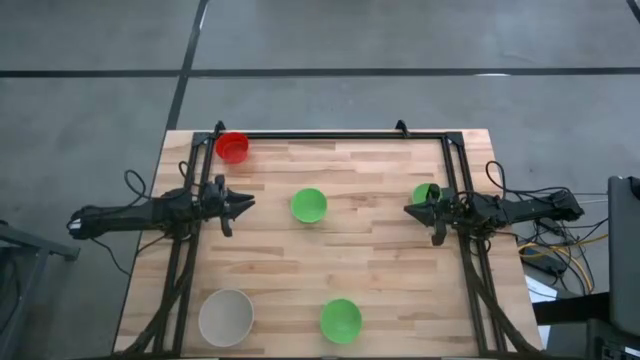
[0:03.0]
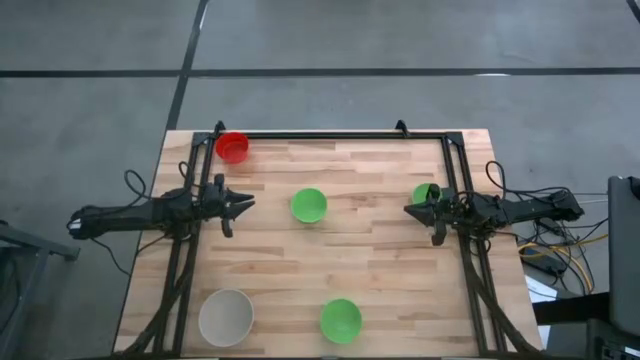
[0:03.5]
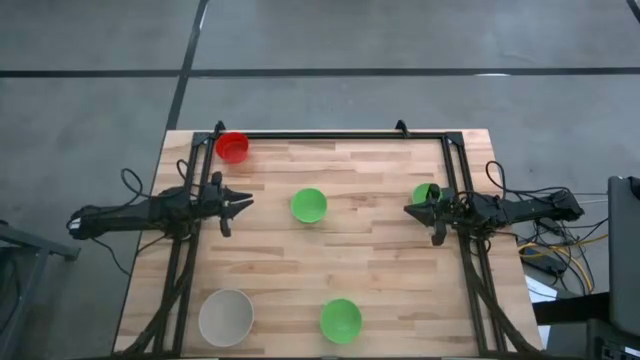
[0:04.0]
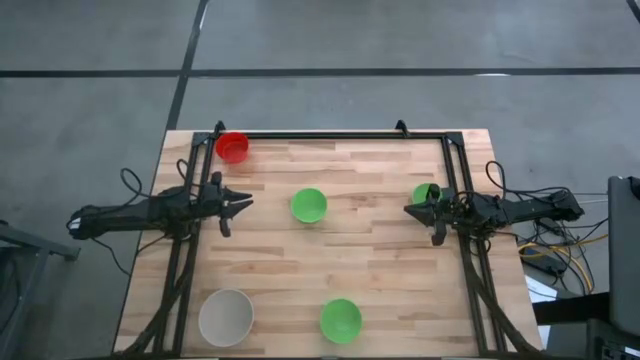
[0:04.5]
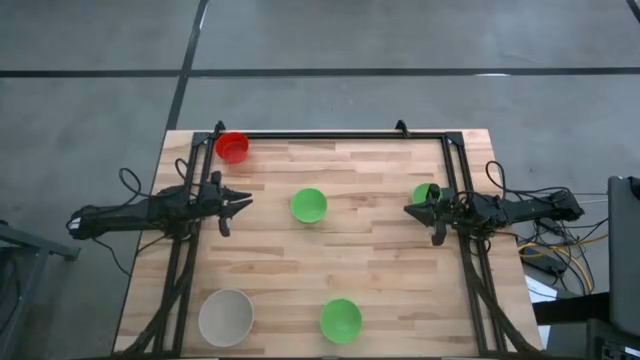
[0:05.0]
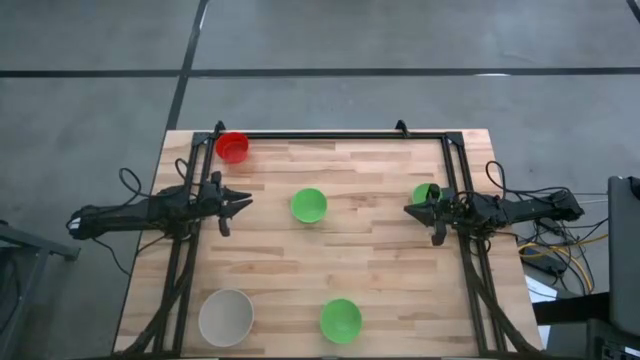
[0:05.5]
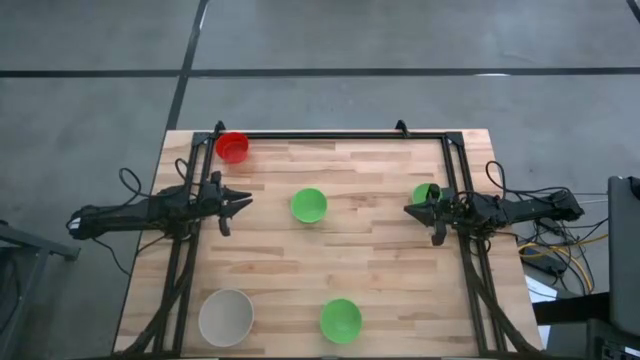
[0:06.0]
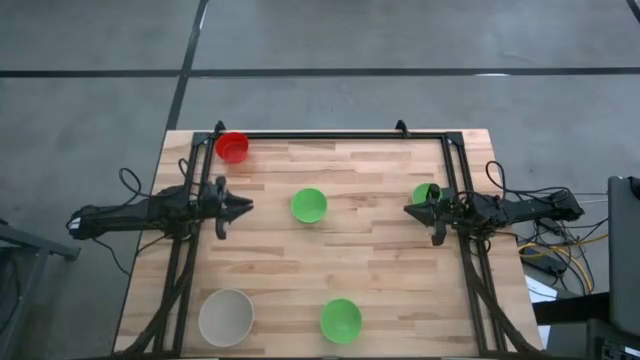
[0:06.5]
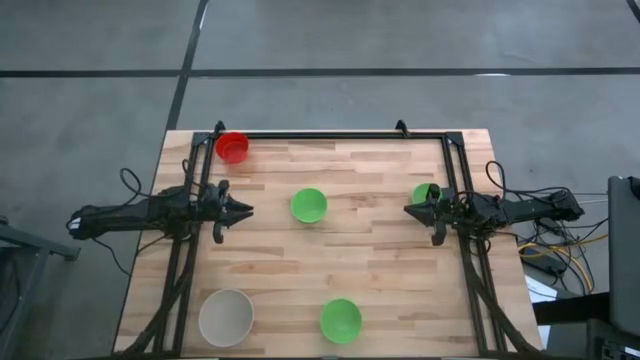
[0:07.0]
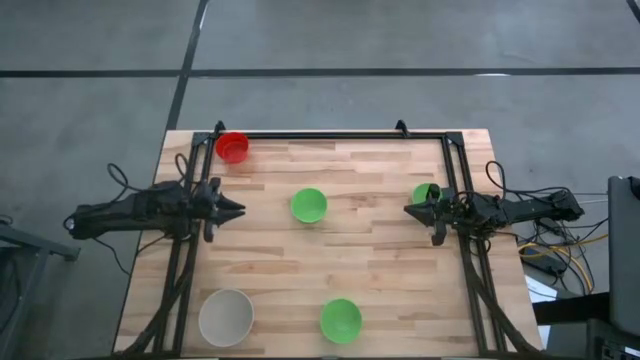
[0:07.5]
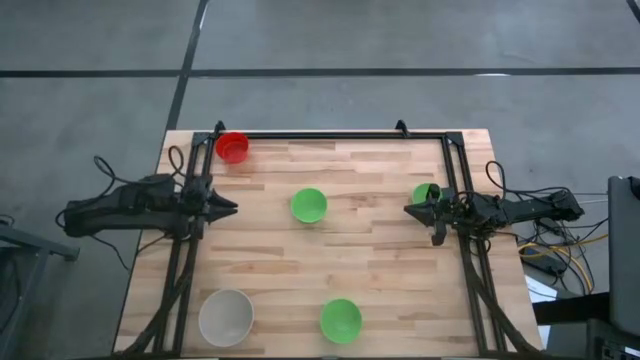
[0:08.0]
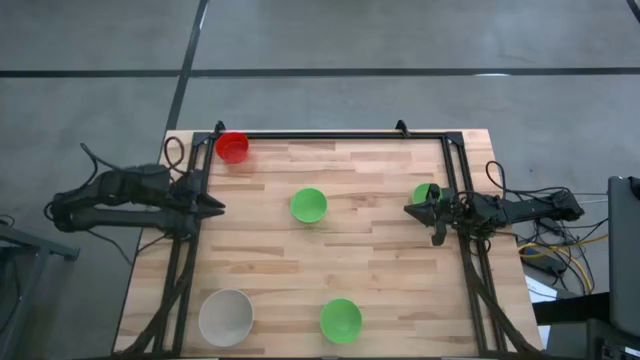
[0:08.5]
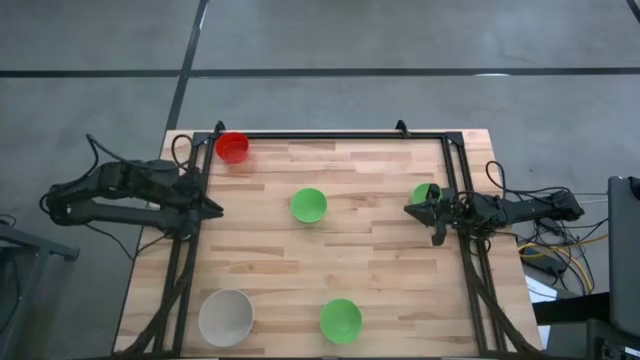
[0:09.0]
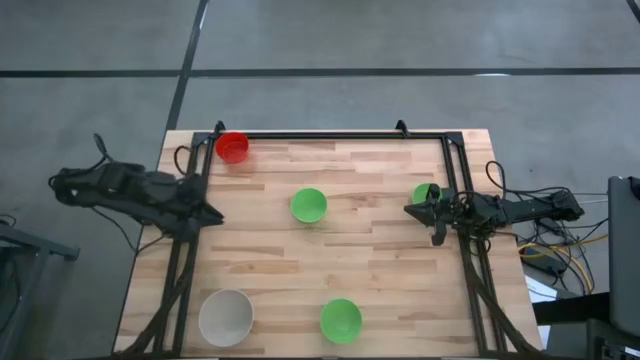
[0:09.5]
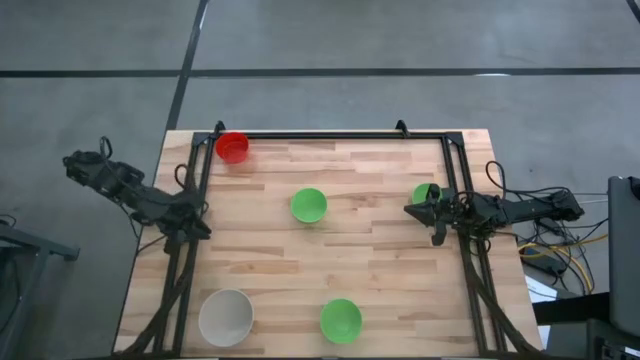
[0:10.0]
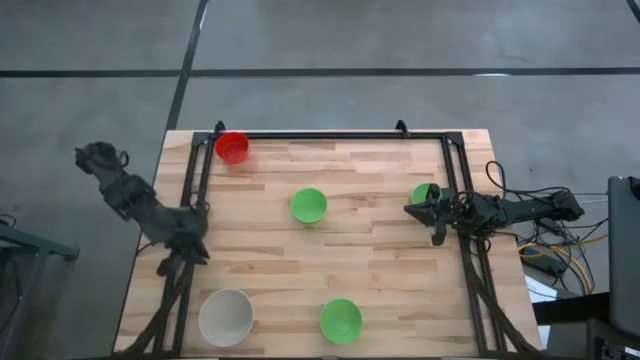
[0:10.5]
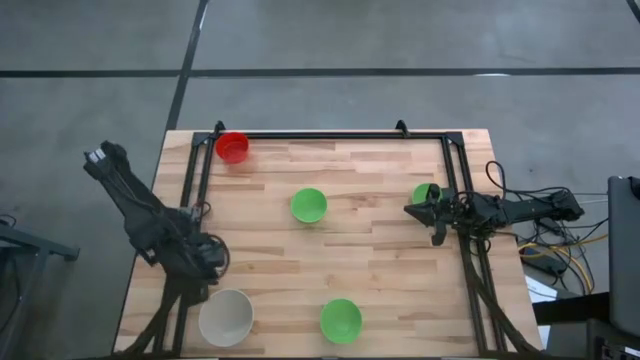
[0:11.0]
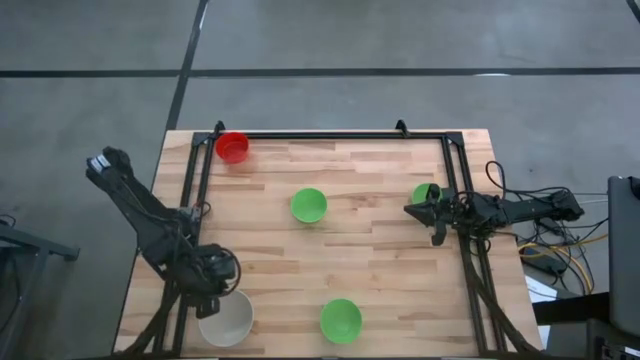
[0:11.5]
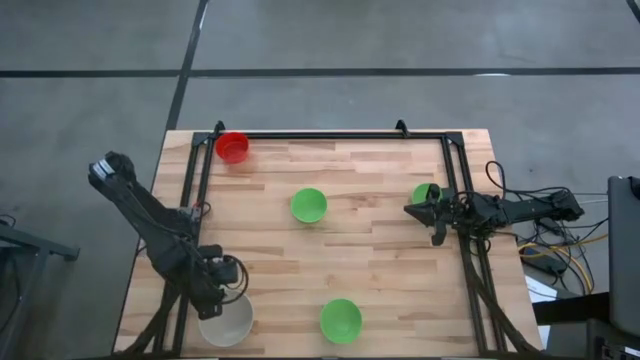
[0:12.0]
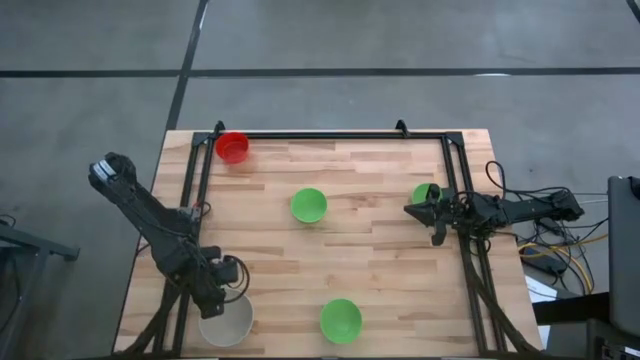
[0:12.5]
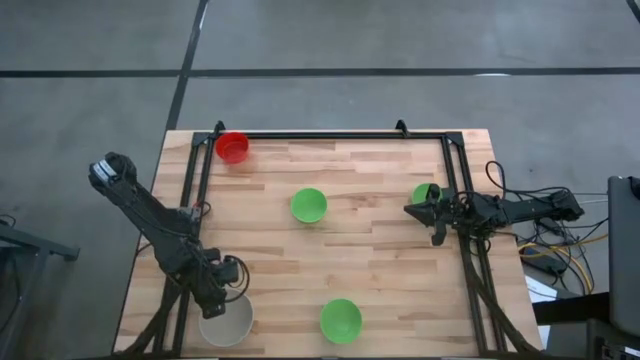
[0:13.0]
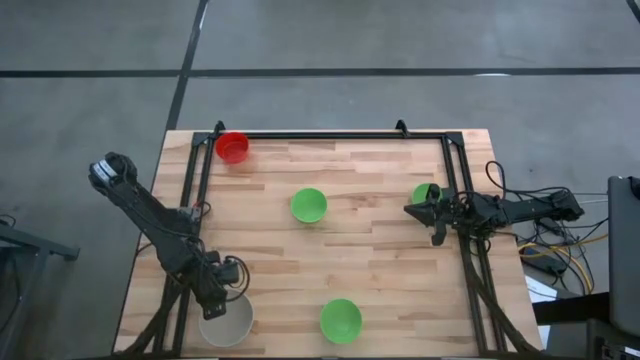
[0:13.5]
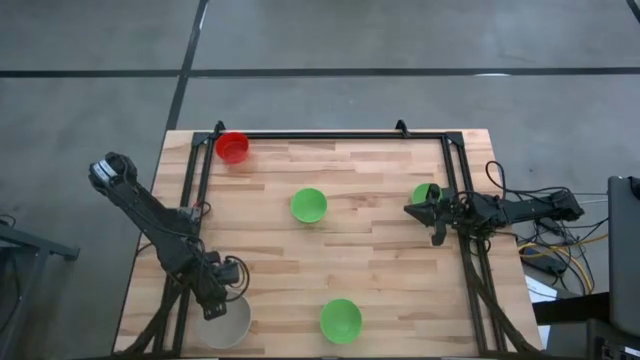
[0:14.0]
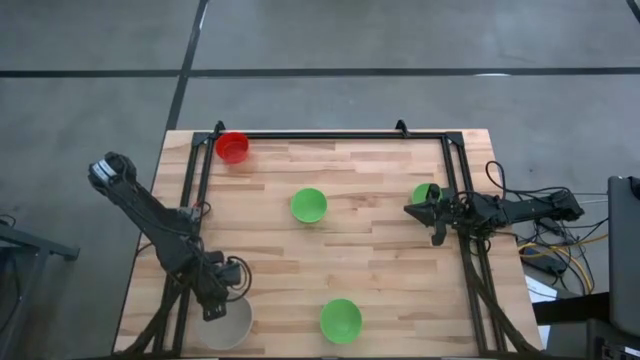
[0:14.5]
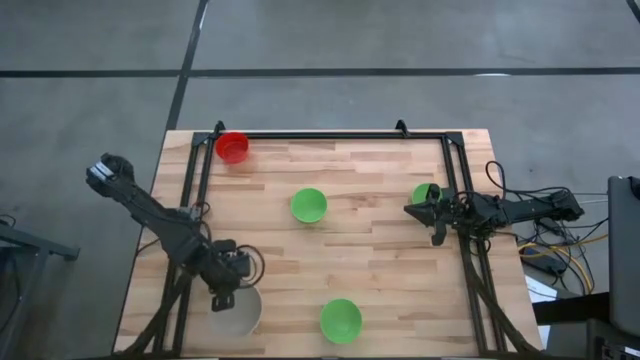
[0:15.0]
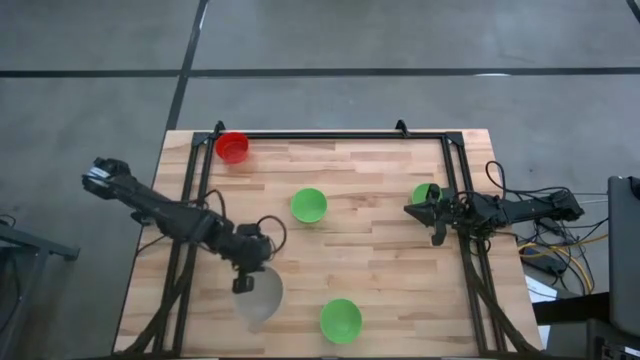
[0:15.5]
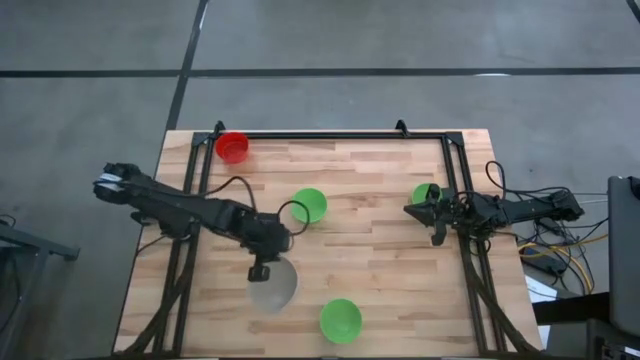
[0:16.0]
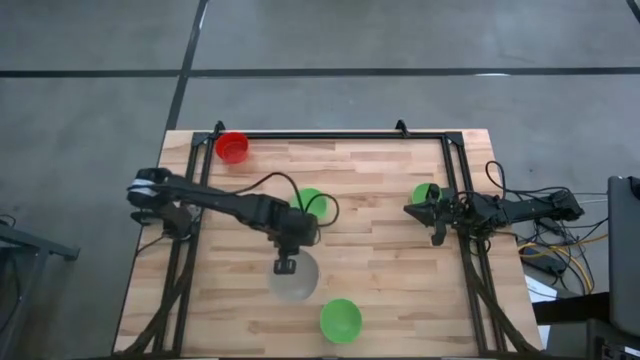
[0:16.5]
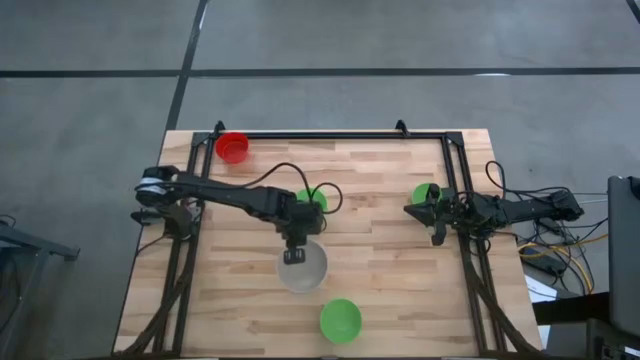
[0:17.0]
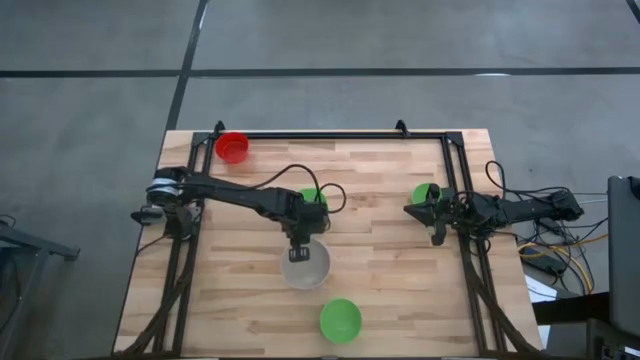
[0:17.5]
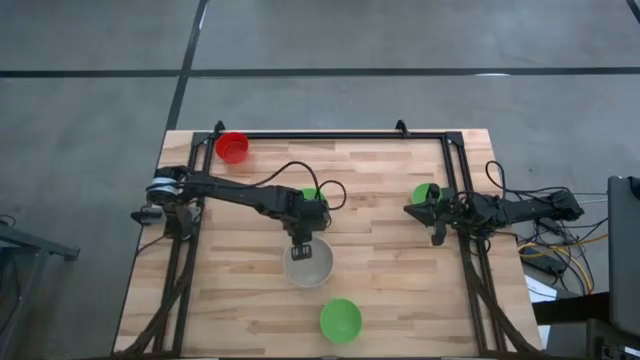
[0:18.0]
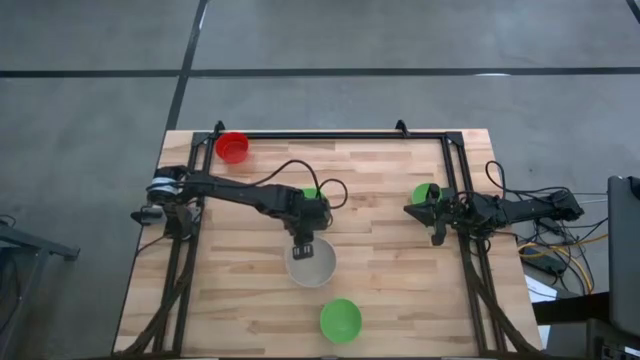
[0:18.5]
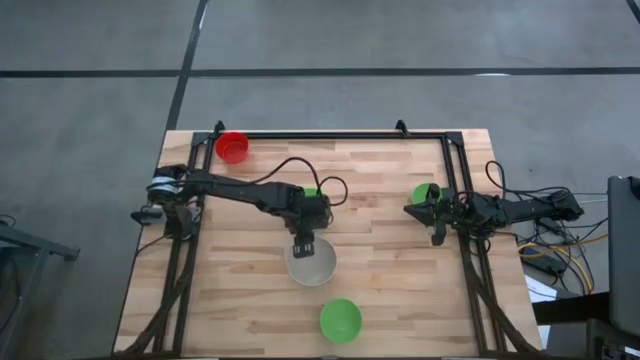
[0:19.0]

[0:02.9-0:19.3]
Move the gray bowl to the center of the table
